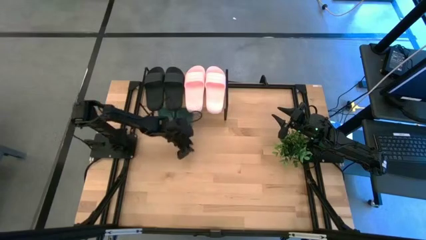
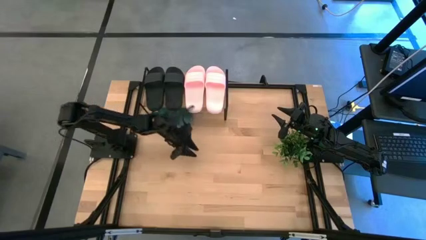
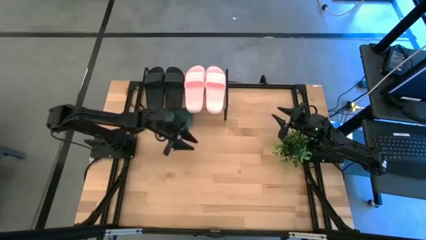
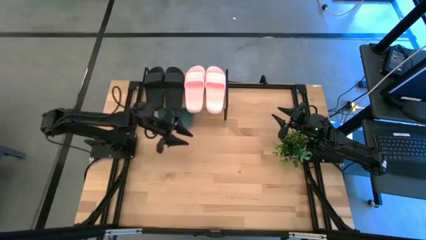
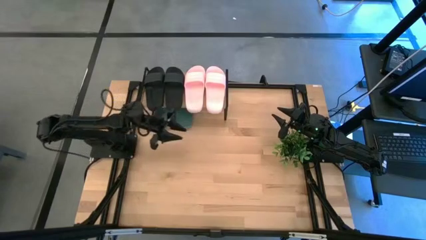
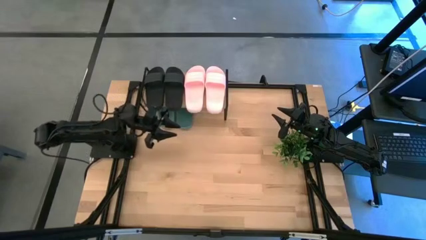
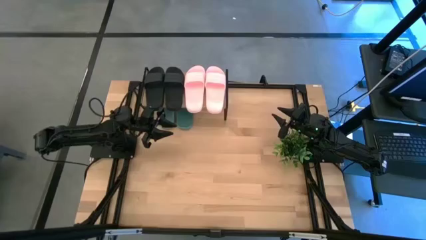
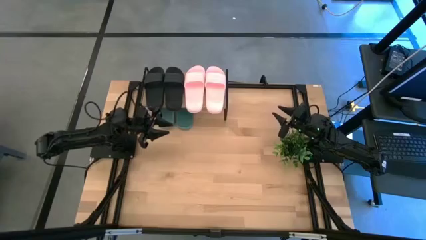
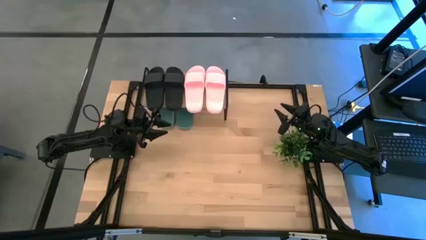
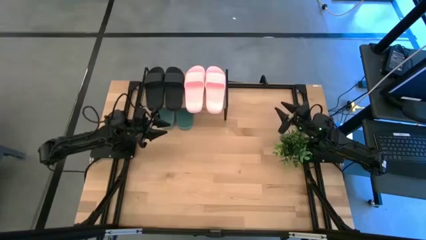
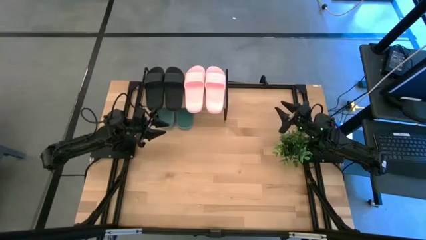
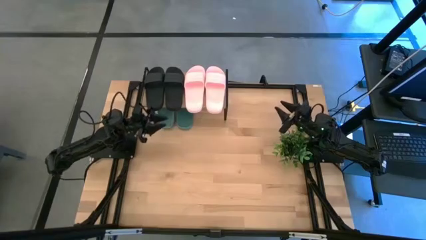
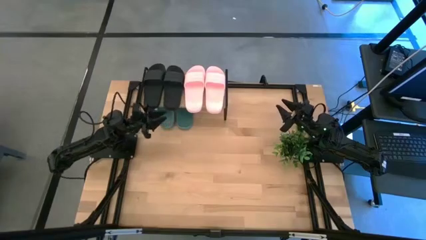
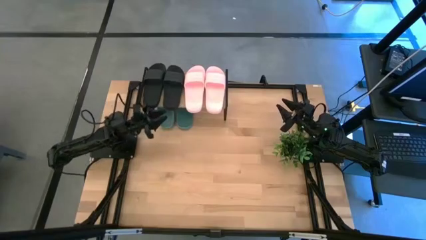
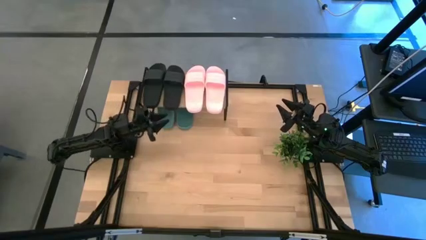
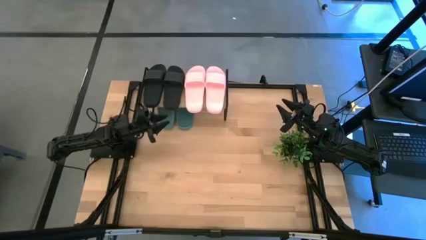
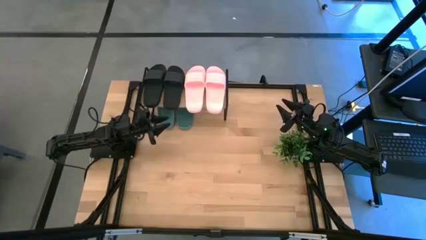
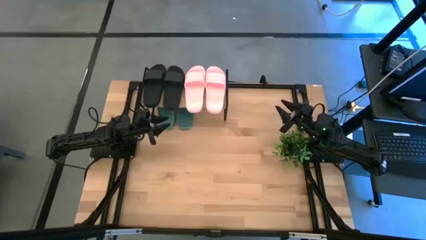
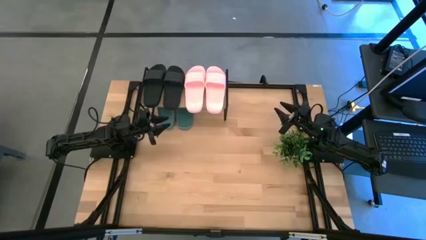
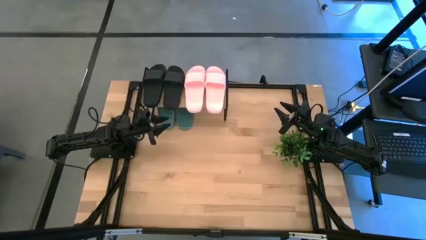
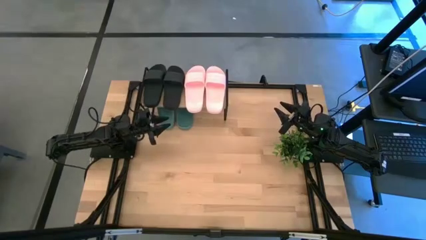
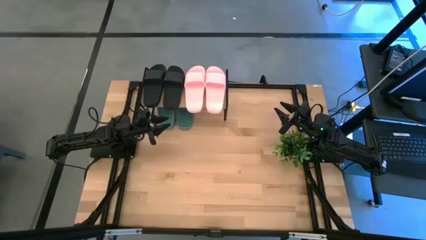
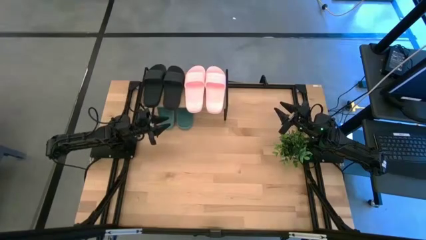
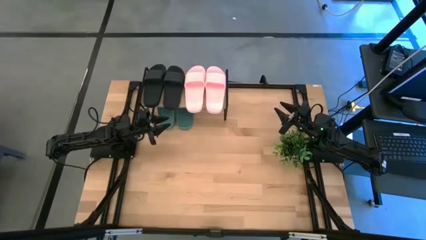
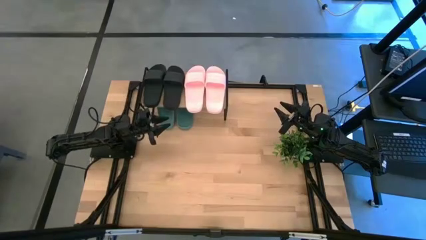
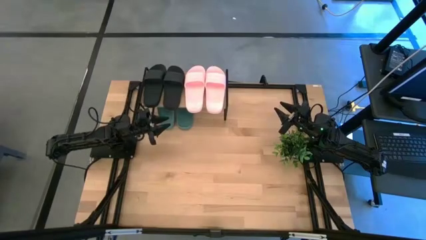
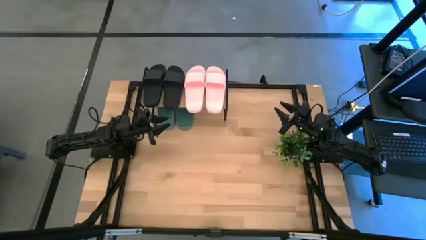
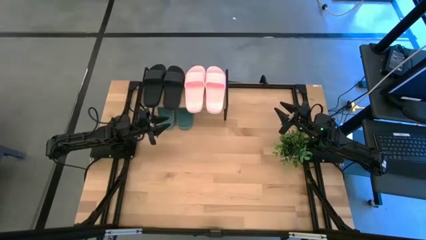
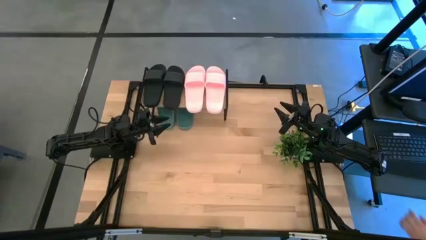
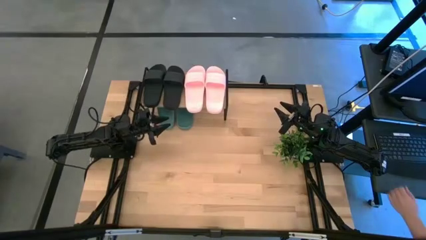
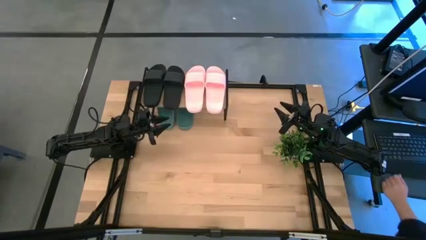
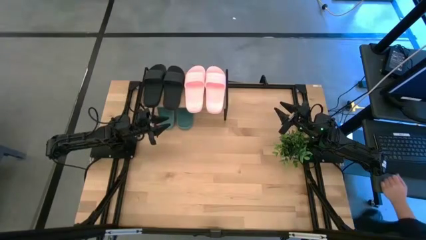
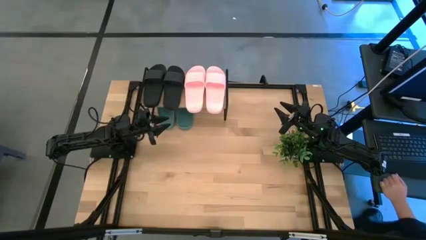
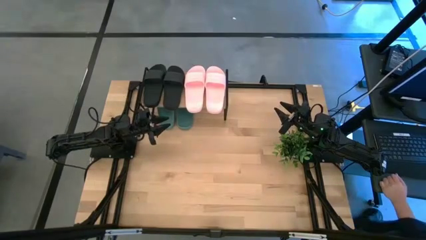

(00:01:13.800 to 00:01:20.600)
Task: Pick and place slides into the shelf
Return to Home Position

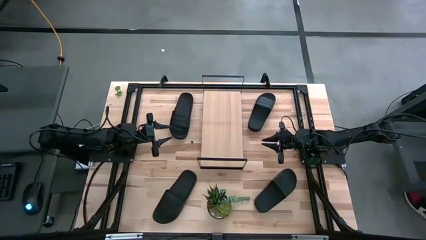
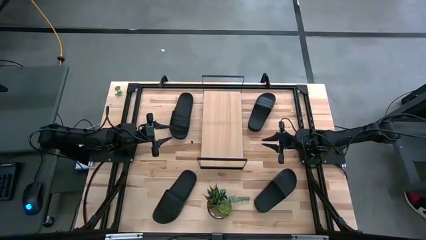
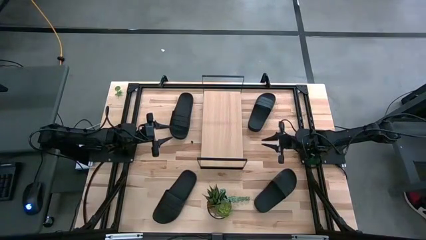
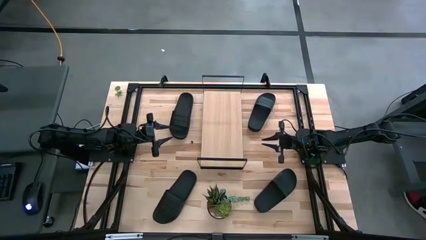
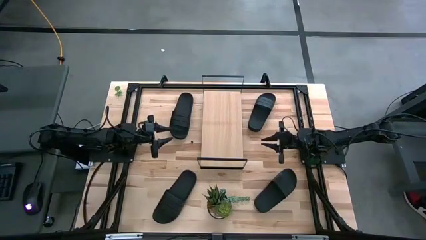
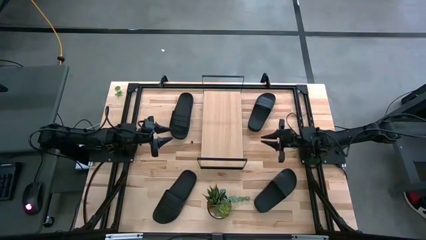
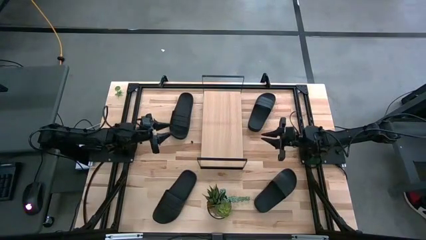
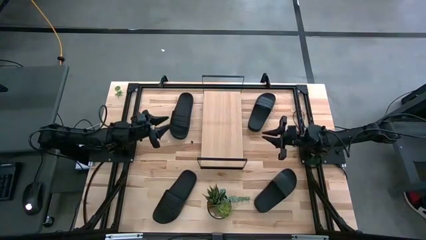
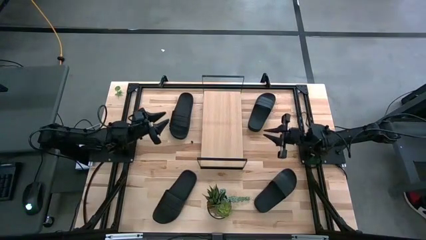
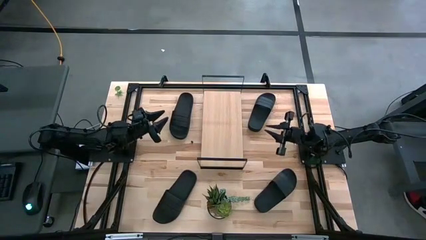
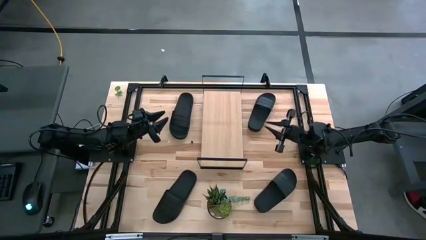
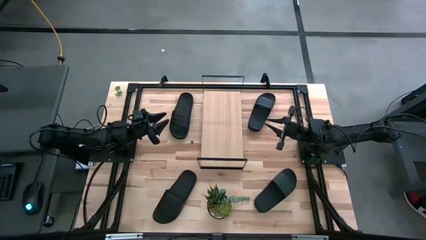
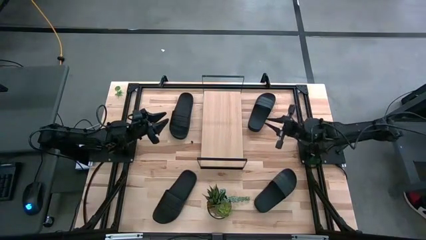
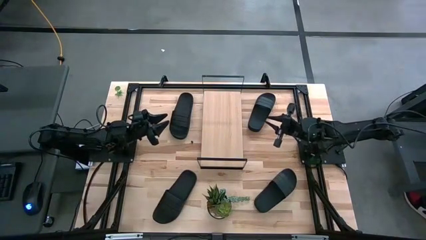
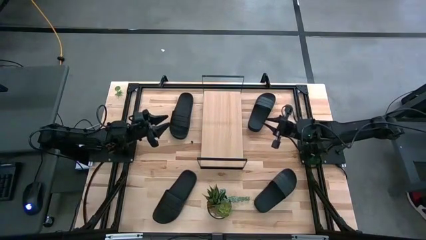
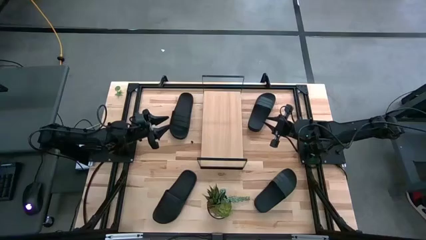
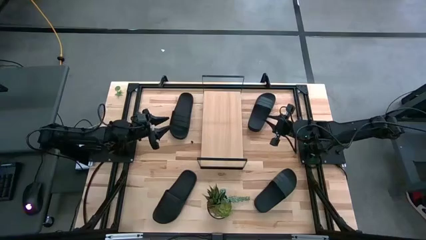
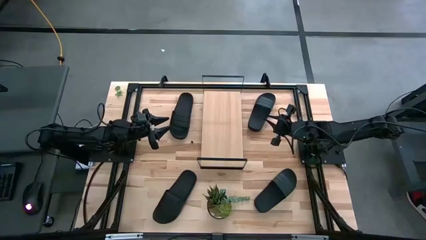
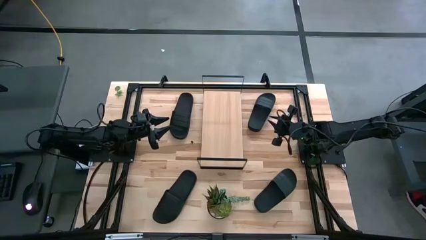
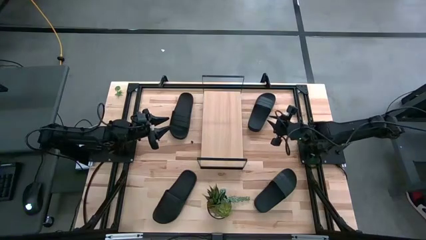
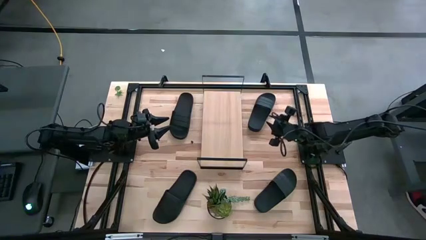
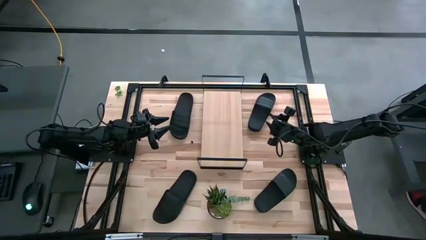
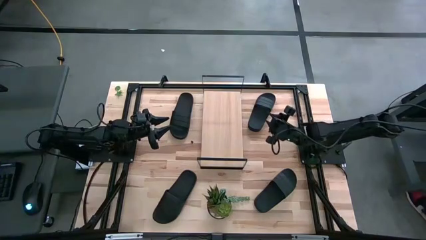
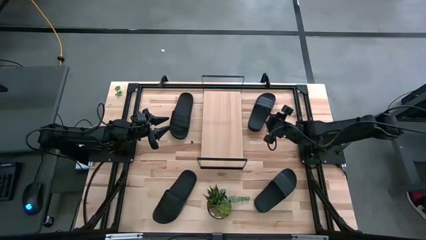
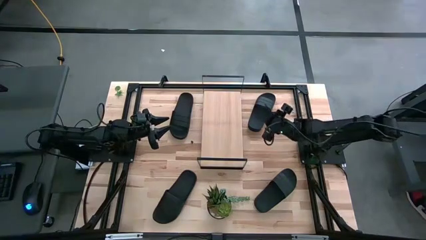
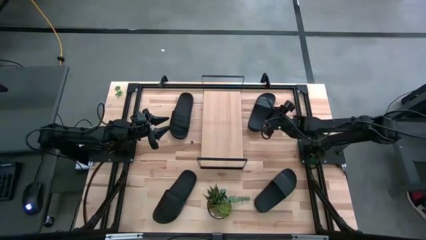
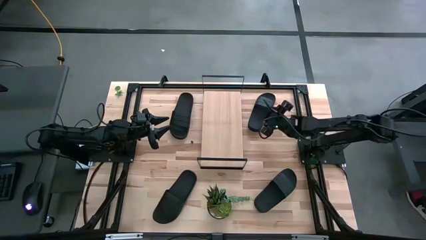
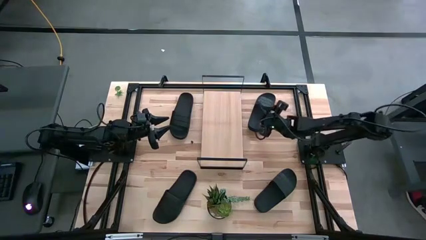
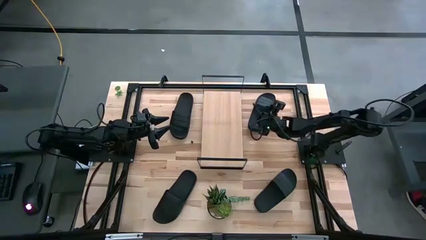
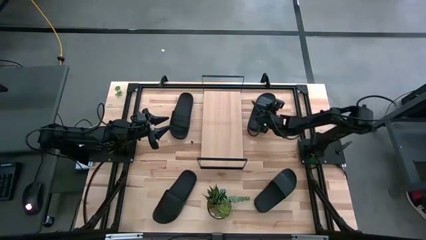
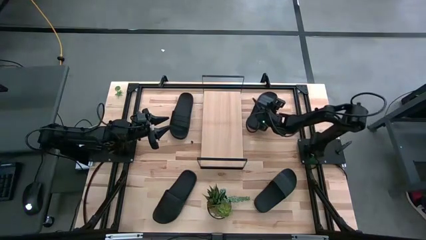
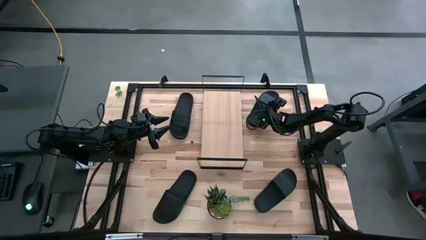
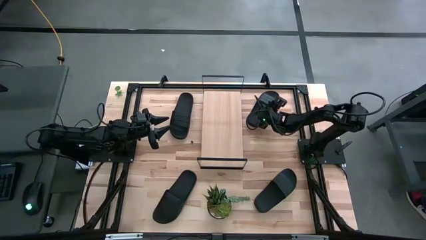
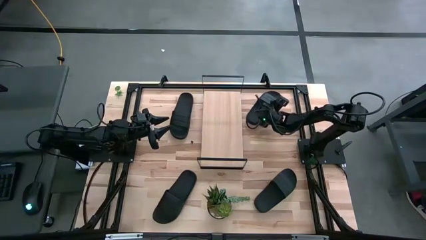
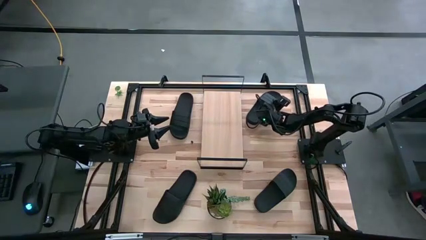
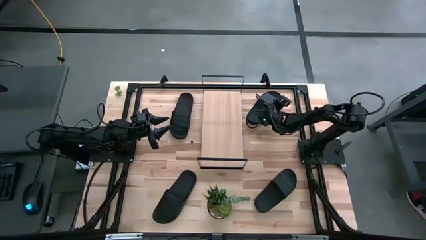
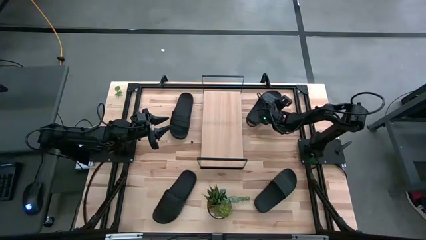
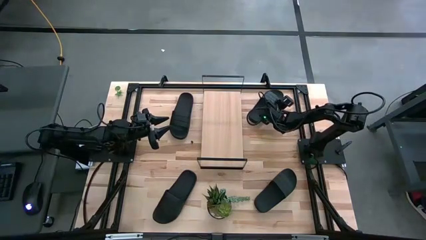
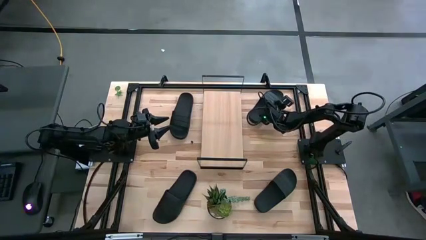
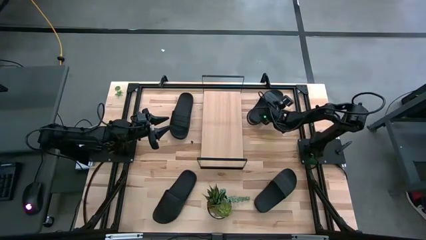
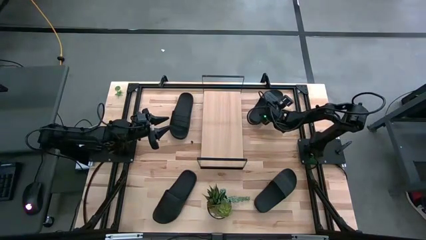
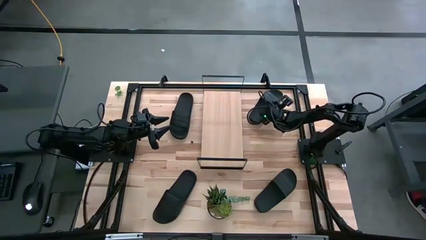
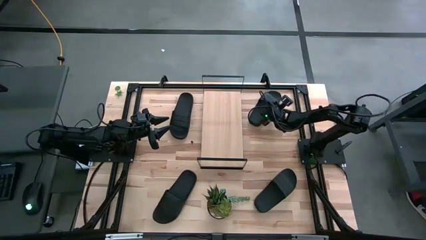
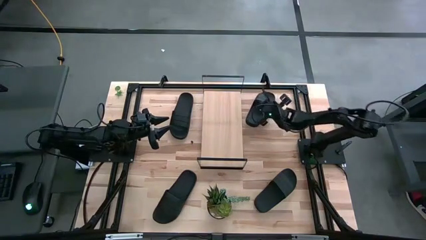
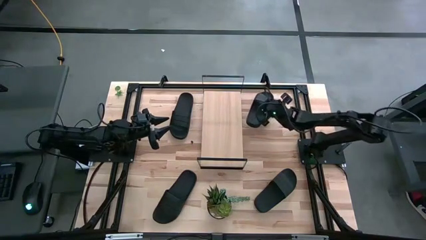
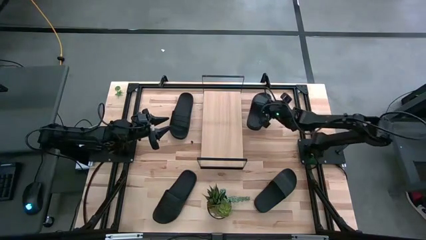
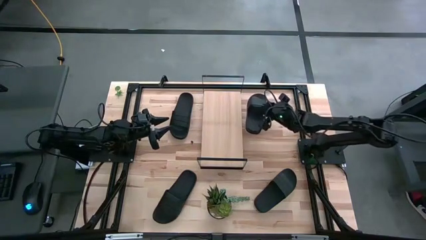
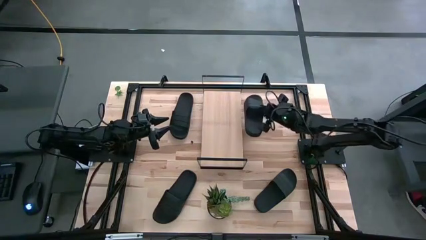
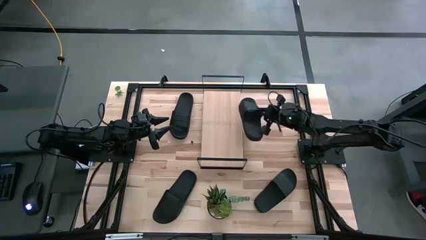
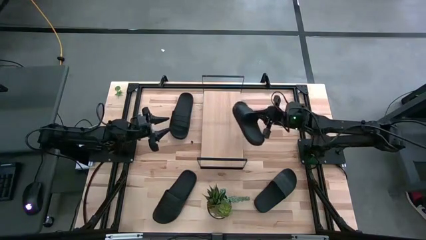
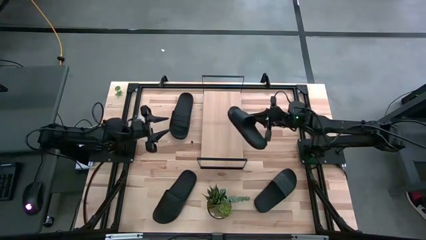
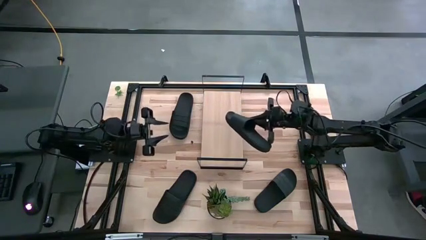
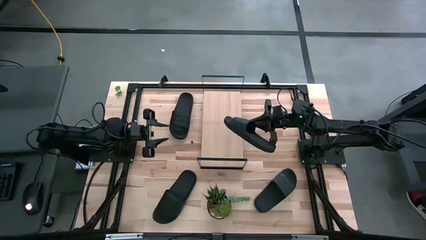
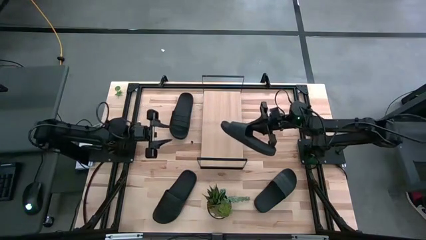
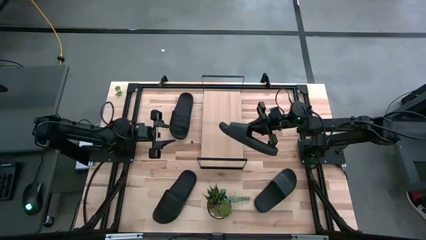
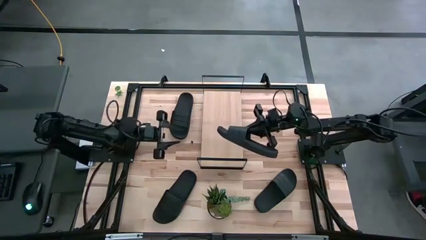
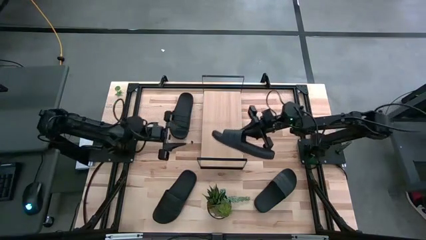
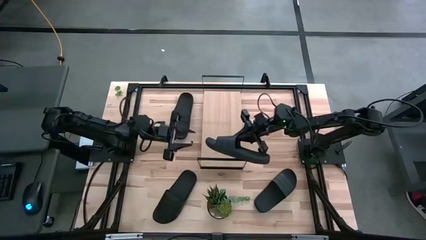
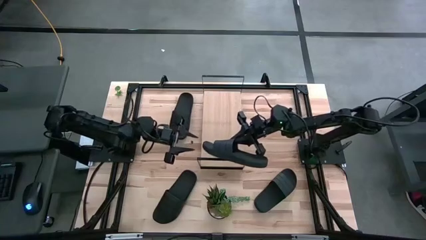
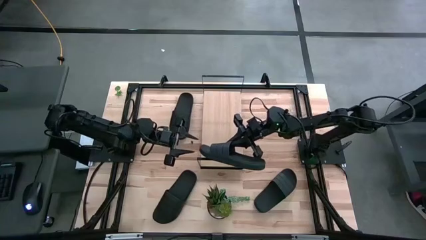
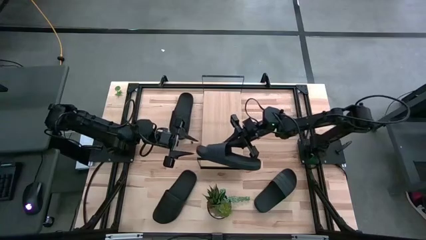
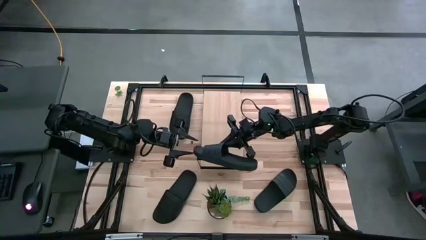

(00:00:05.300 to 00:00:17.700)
Task: Pick and place slides into the shelf
Put the top right black slide on the shelf
